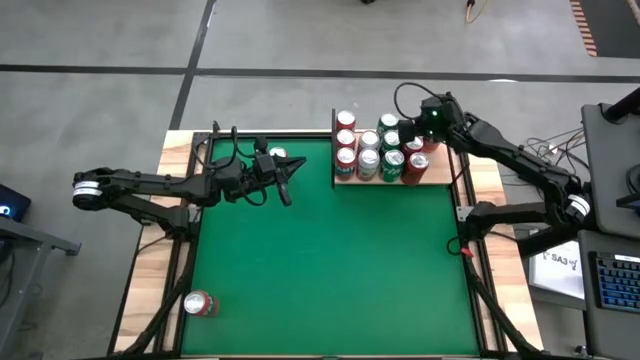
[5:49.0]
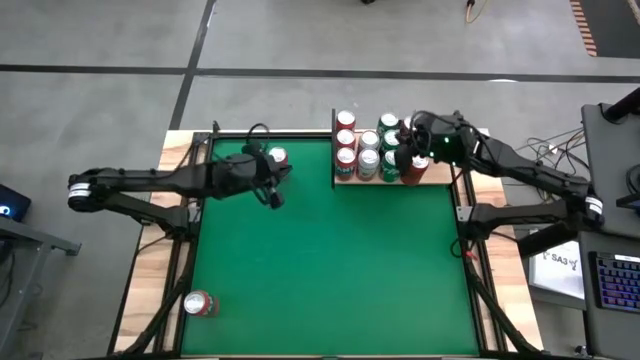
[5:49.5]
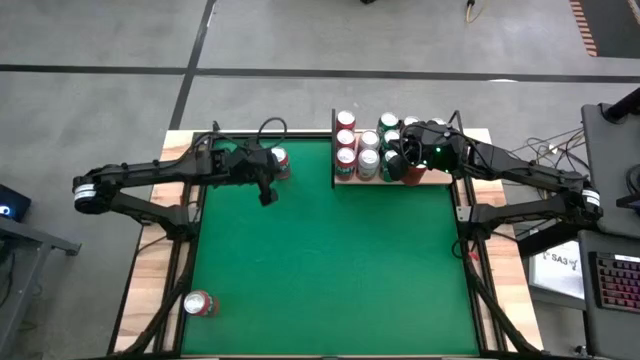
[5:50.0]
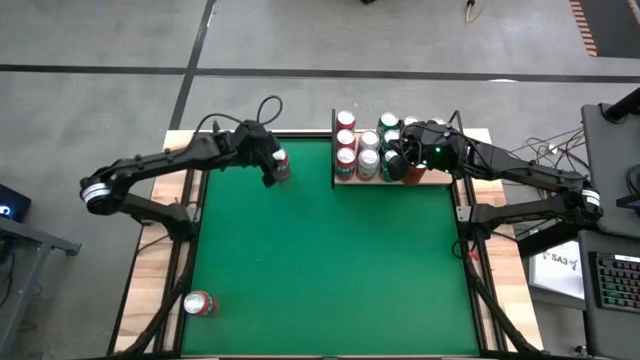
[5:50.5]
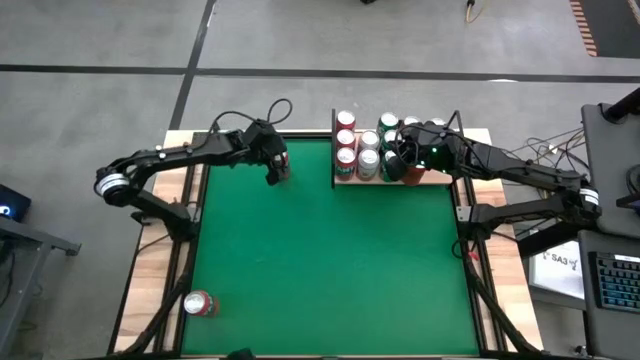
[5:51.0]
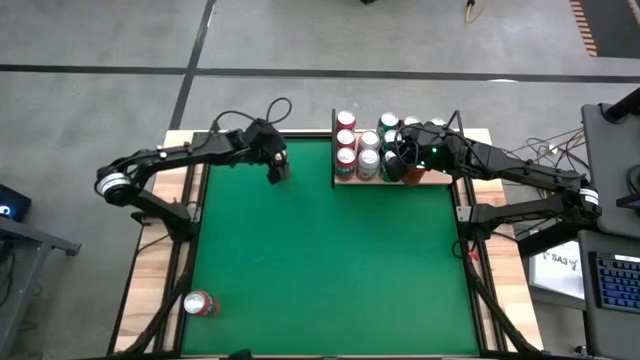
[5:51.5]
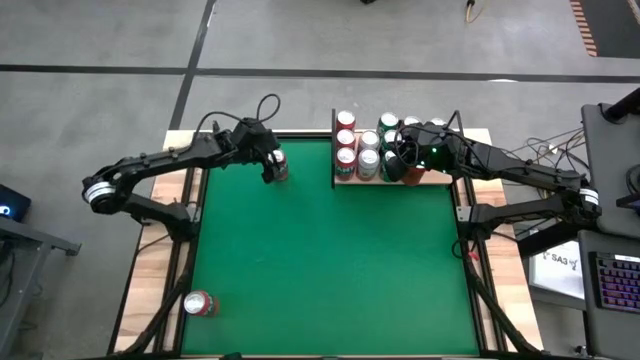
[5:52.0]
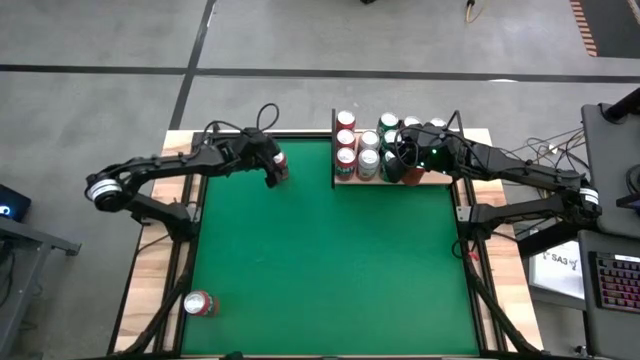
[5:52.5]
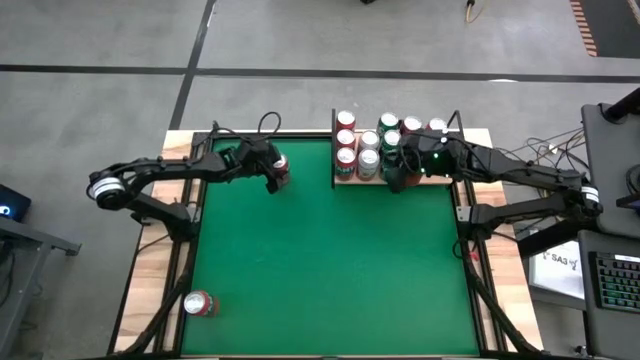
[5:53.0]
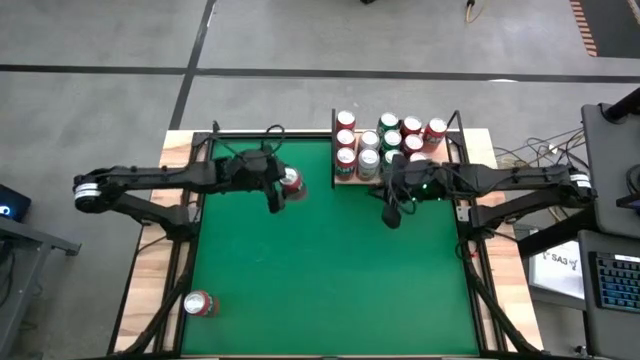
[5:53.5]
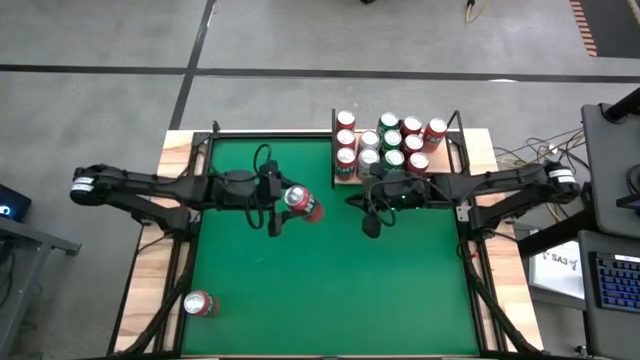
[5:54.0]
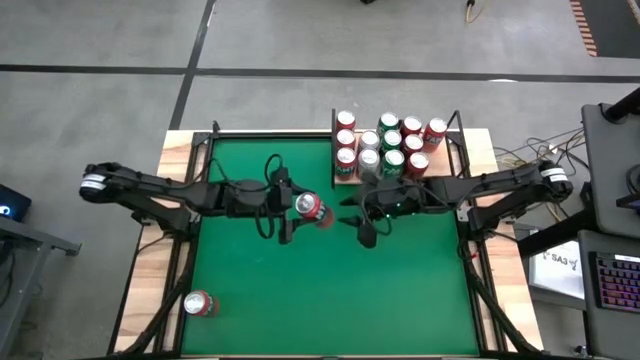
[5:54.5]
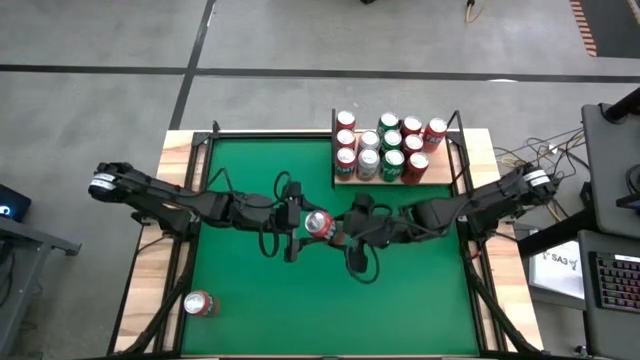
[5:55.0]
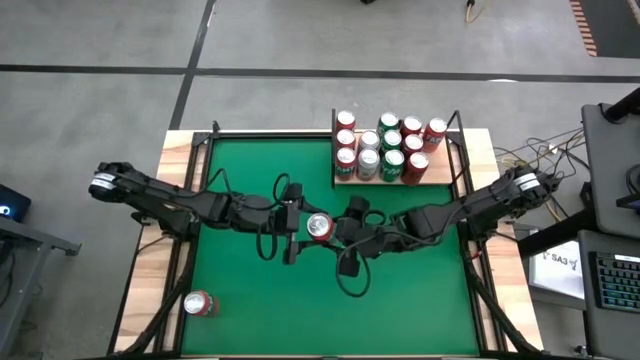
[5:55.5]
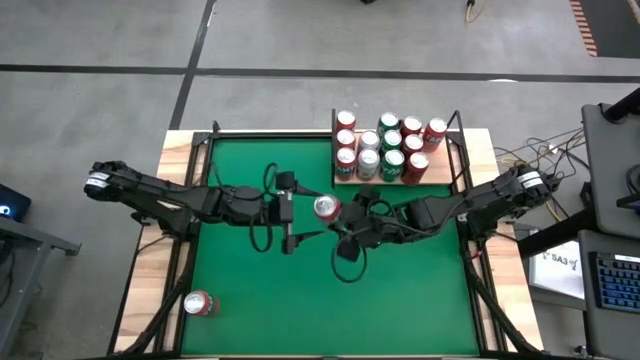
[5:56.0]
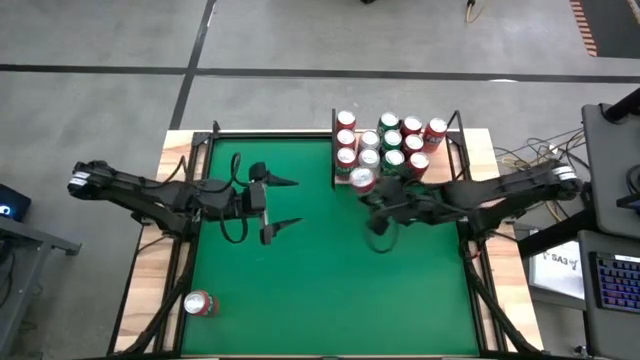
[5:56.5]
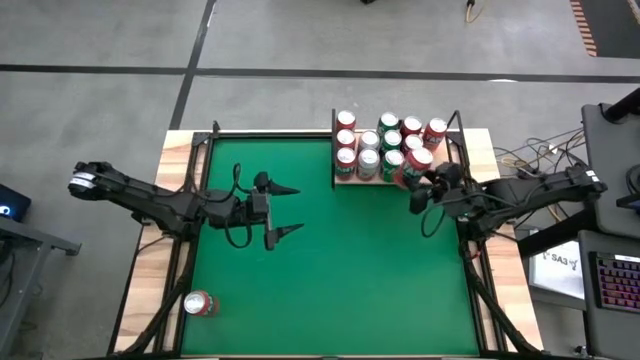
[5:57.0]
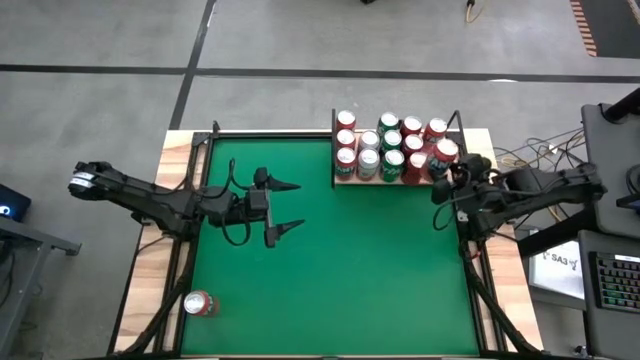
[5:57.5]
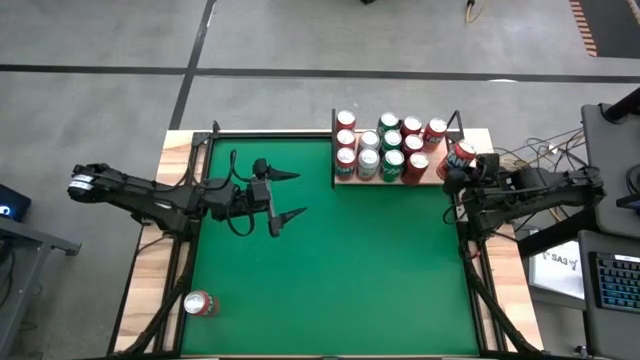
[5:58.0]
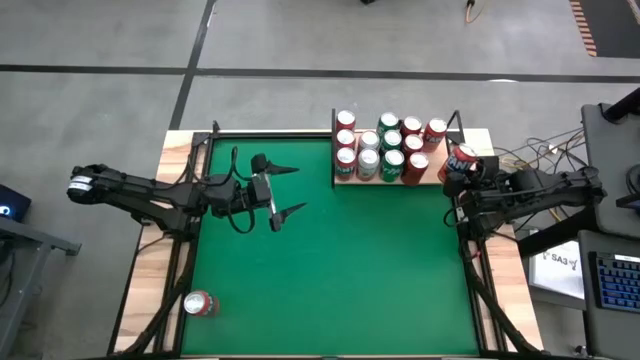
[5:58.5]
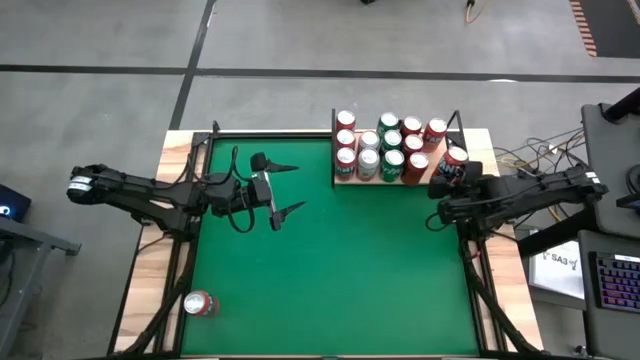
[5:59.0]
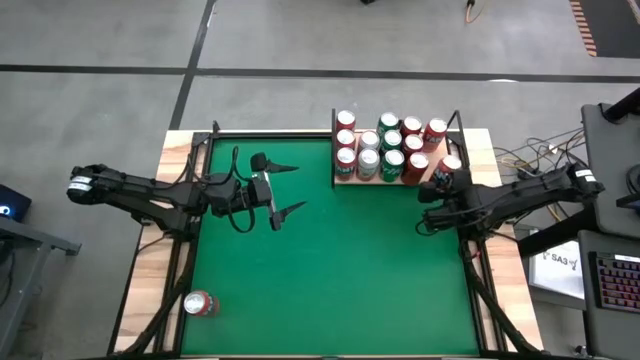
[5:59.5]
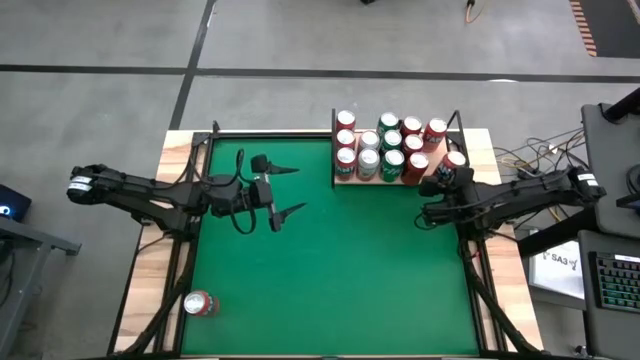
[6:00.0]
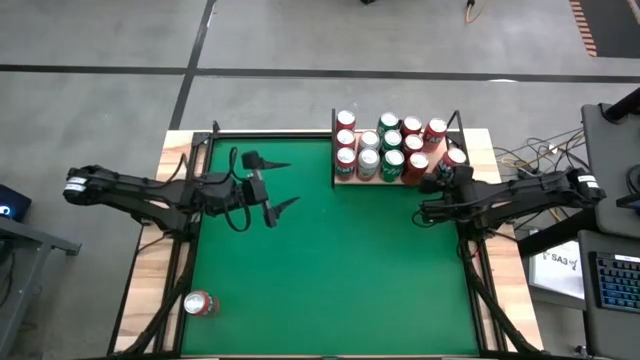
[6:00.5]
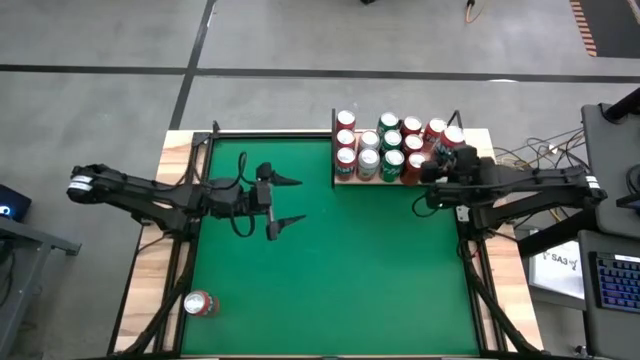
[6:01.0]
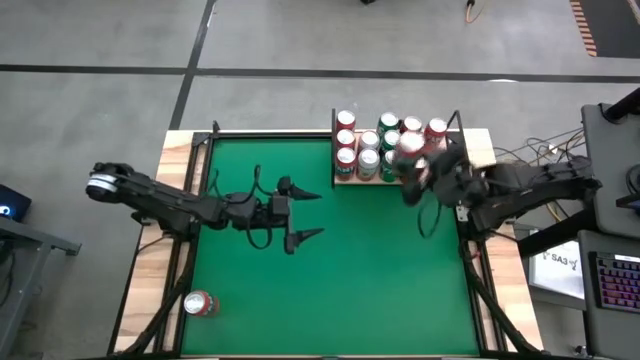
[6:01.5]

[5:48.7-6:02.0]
Task: Place canned beverage on shelf
Put the red soda can on the shelf aligned with the other red soda can

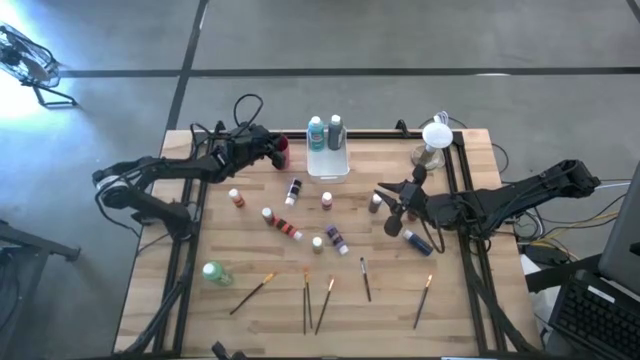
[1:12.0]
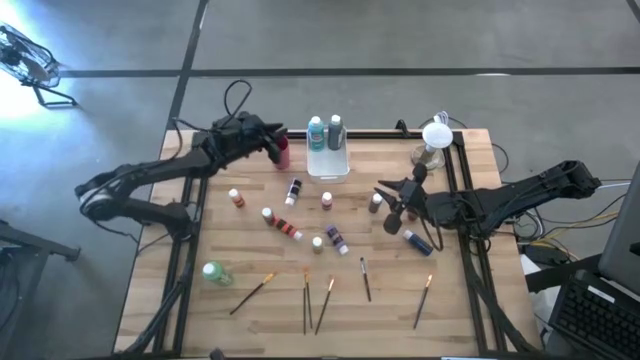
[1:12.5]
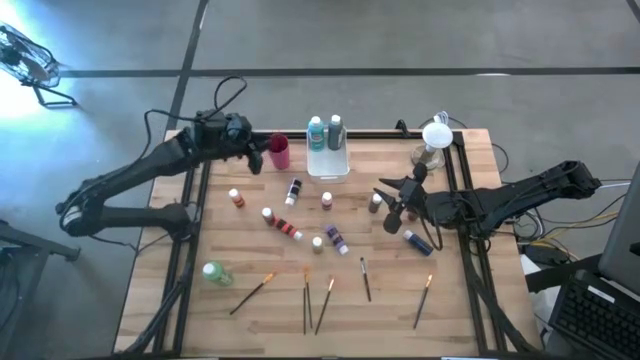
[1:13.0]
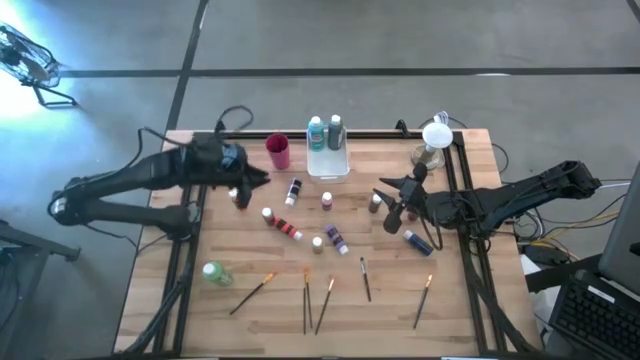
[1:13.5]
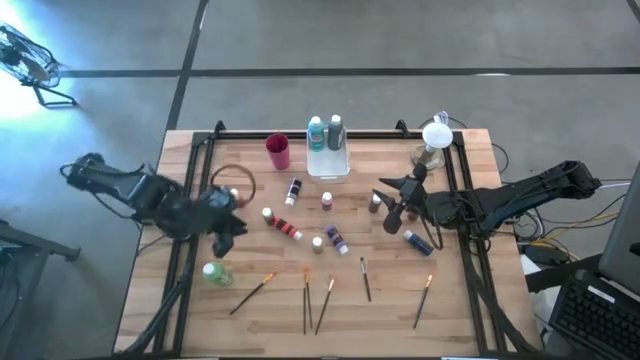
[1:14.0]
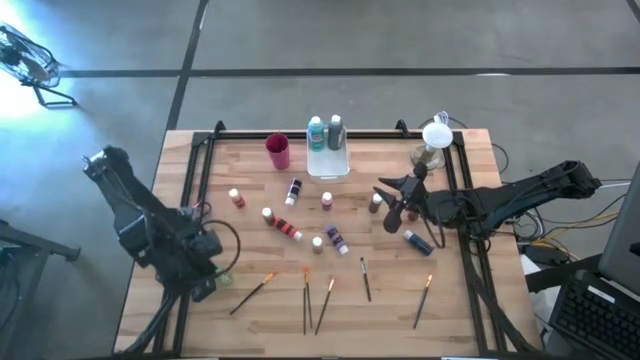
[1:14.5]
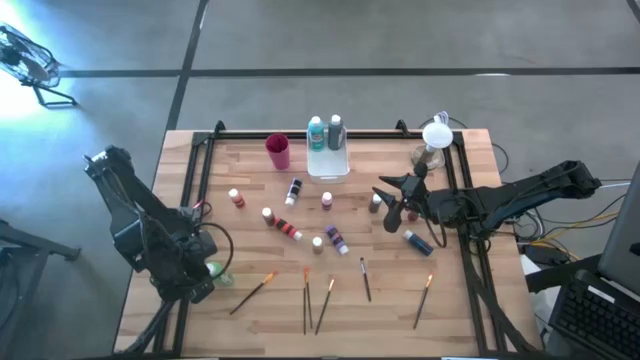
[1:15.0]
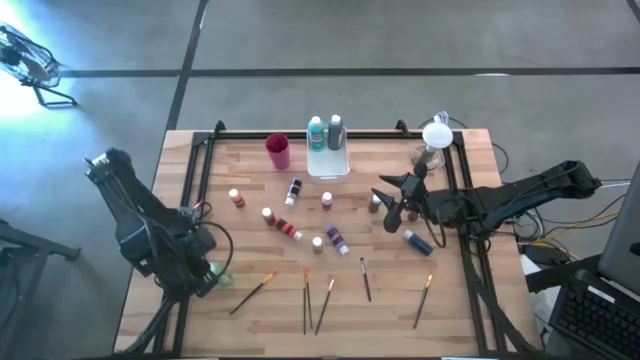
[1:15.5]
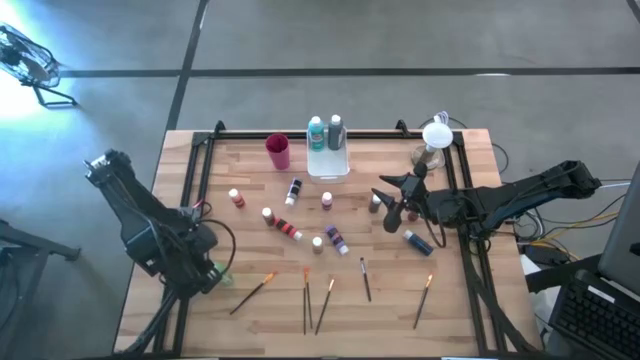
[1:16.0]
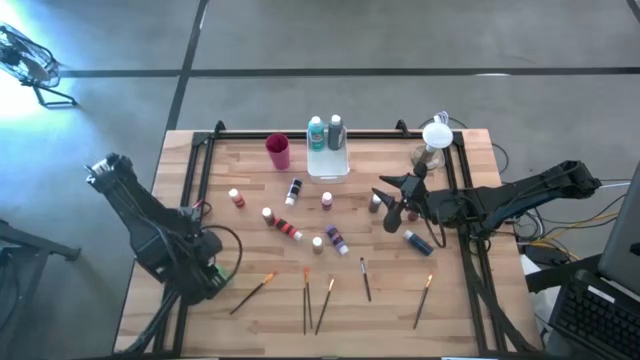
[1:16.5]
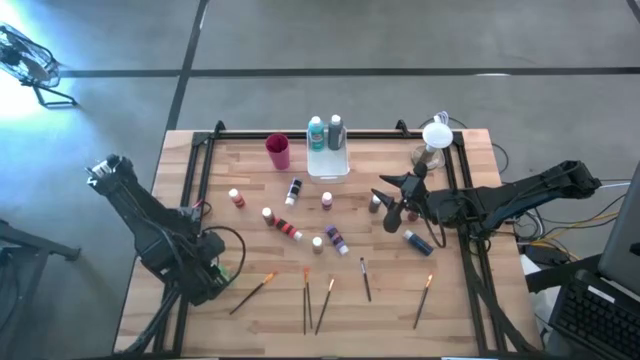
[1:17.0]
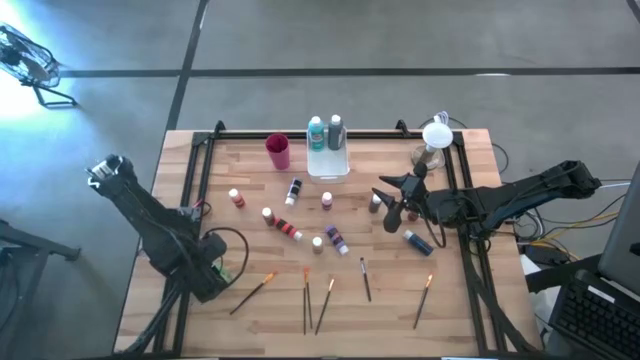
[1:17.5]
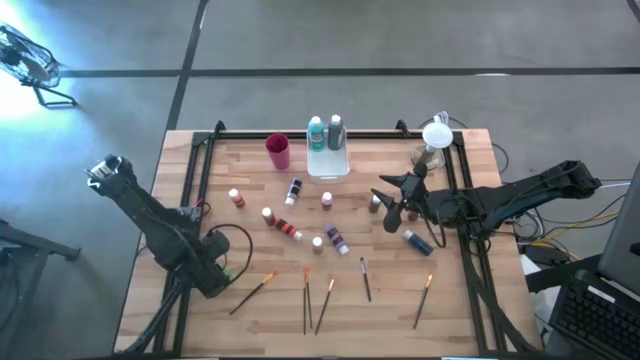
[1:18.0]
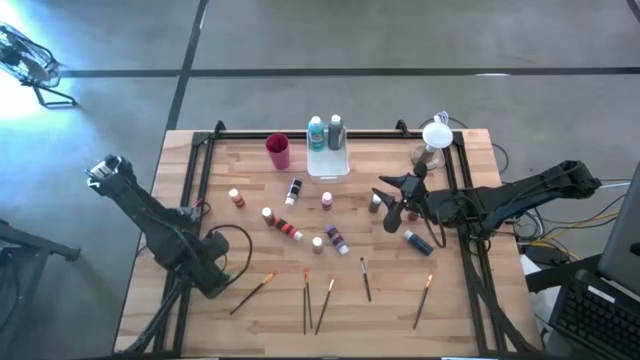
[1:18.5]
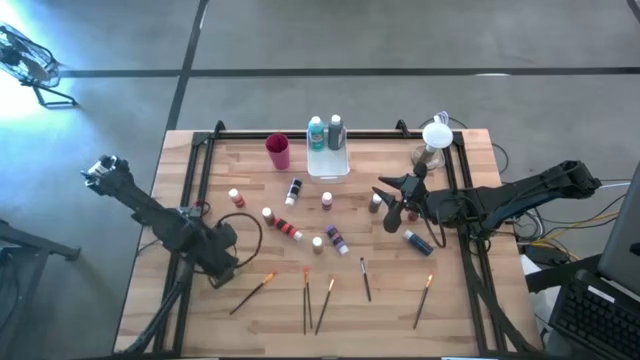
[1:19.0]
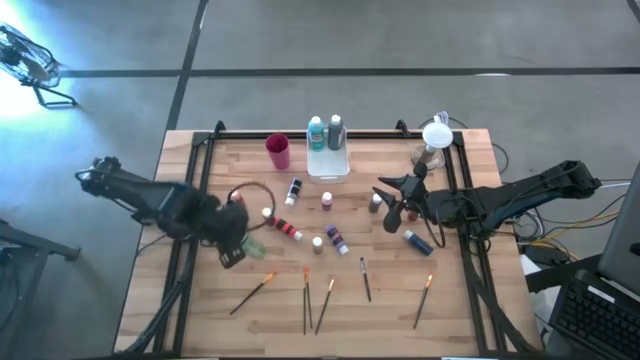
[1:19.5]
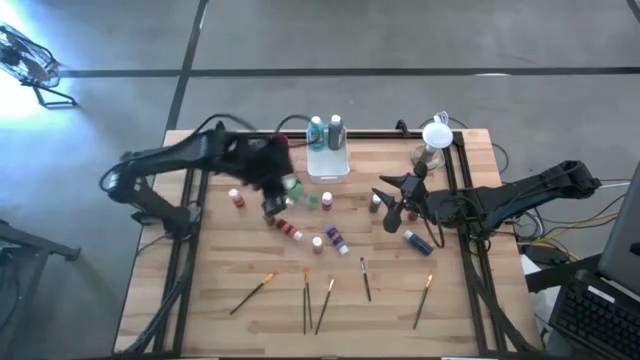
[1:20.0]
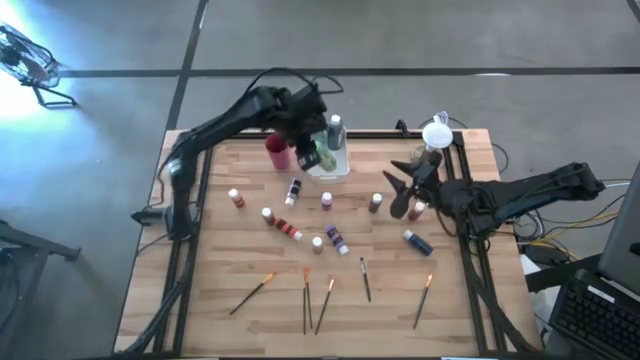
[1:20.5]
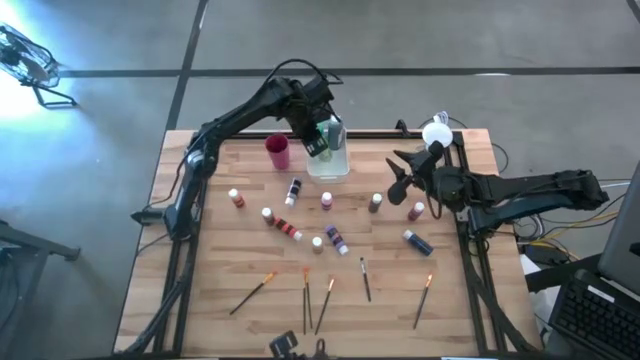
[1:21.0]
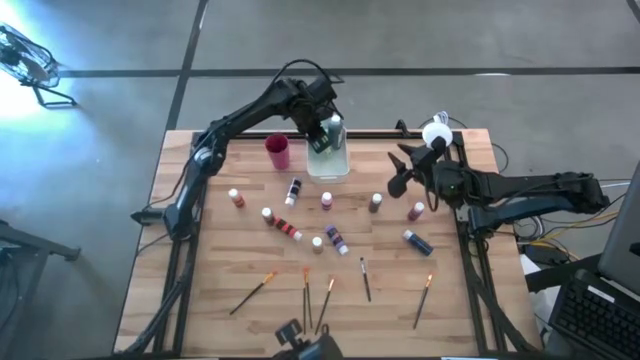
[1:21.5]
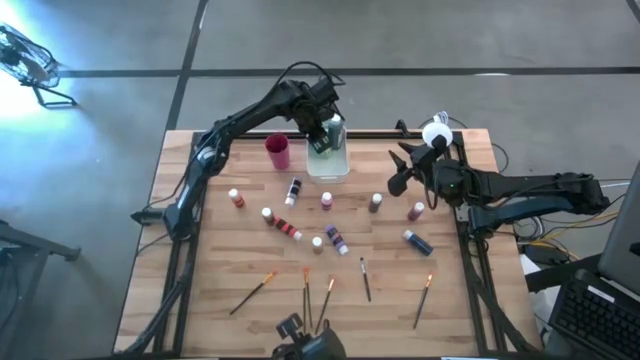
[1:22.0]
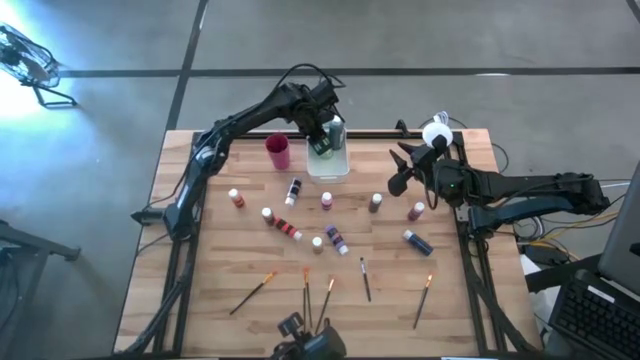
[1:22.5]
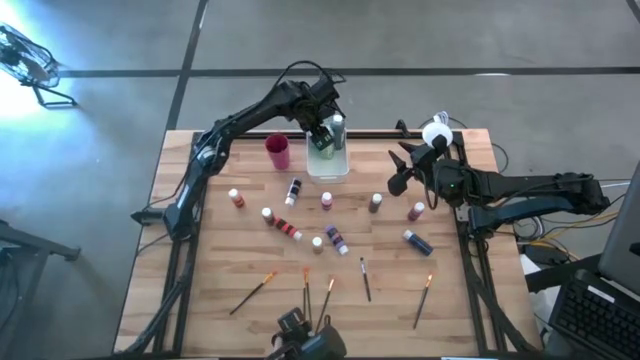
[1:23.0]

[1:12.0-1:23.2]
Task: Pick & Place Paint Supplies
Put the green paint bottle into the white bin
